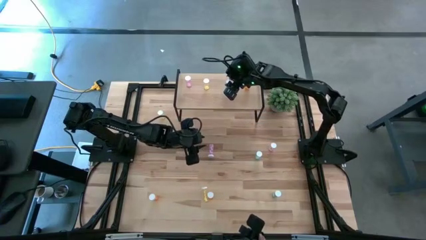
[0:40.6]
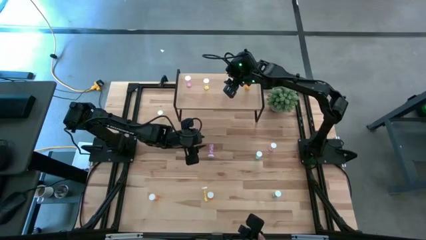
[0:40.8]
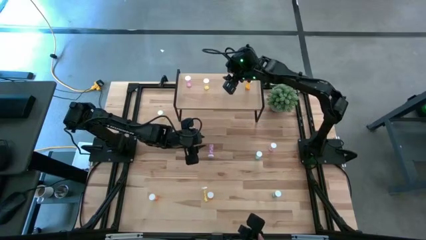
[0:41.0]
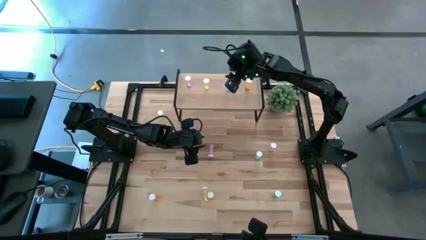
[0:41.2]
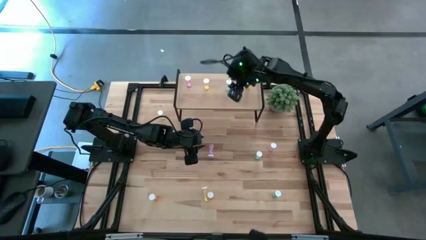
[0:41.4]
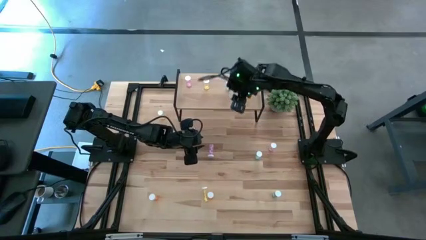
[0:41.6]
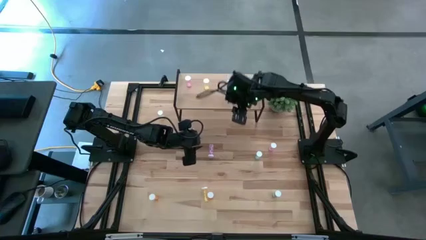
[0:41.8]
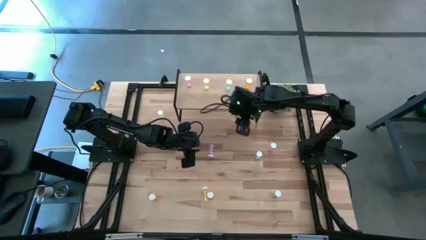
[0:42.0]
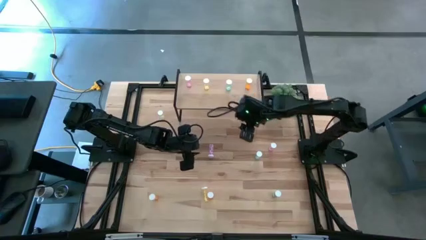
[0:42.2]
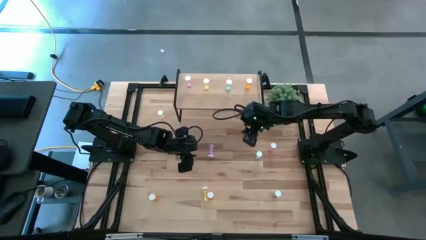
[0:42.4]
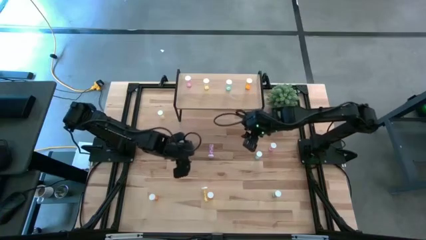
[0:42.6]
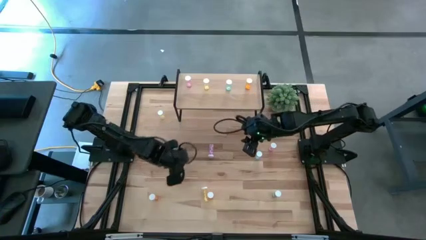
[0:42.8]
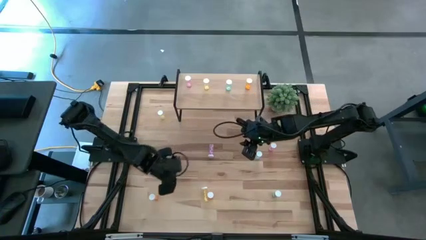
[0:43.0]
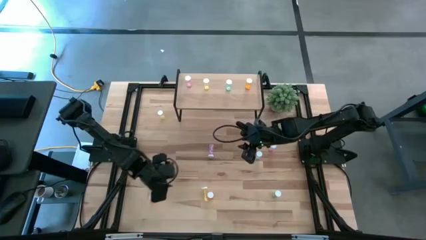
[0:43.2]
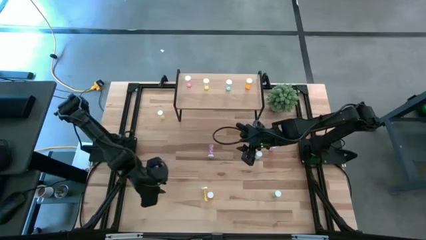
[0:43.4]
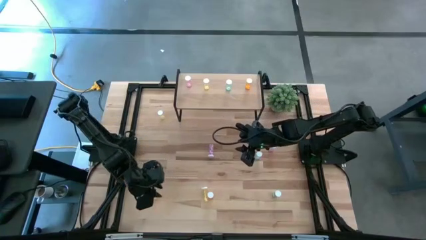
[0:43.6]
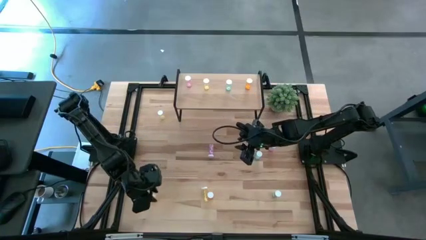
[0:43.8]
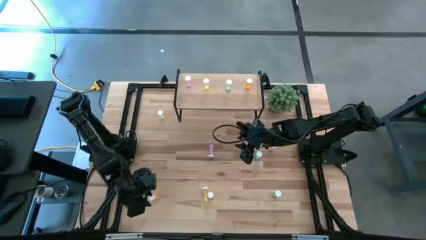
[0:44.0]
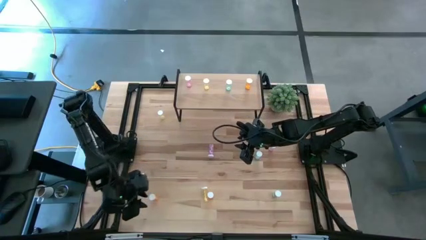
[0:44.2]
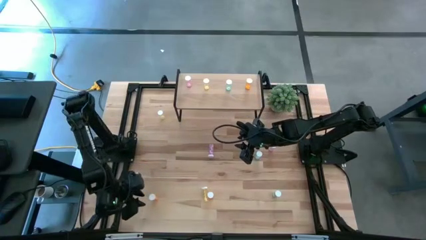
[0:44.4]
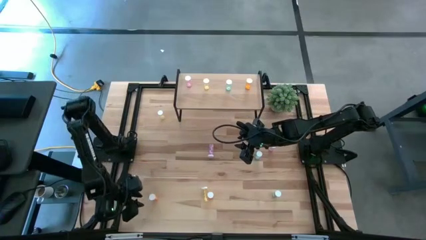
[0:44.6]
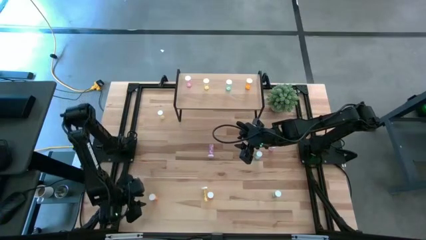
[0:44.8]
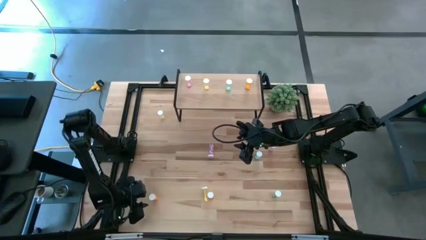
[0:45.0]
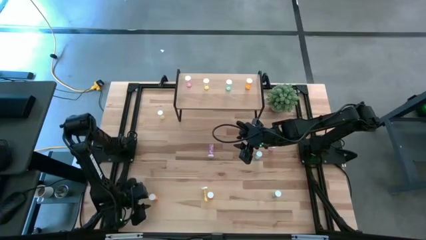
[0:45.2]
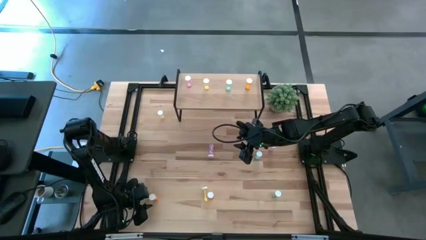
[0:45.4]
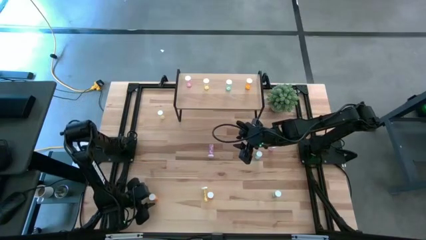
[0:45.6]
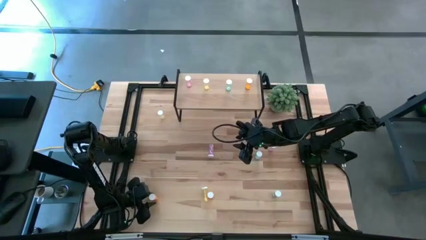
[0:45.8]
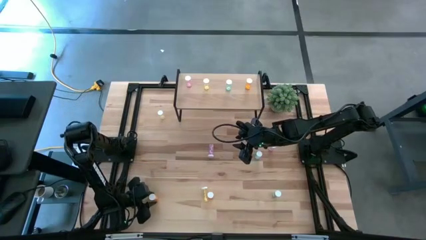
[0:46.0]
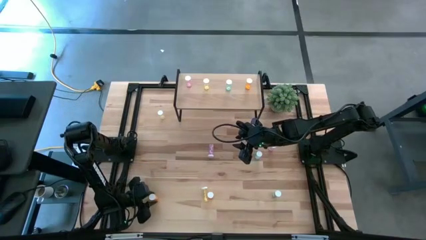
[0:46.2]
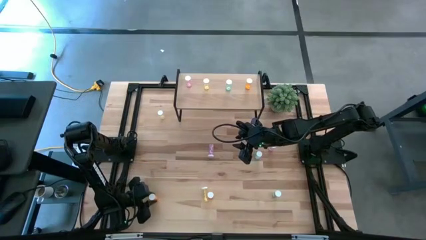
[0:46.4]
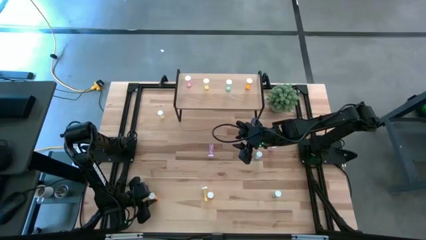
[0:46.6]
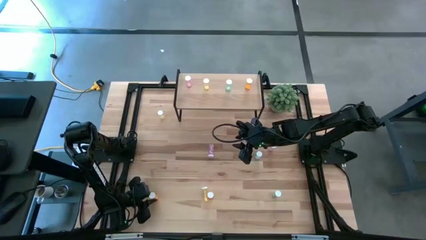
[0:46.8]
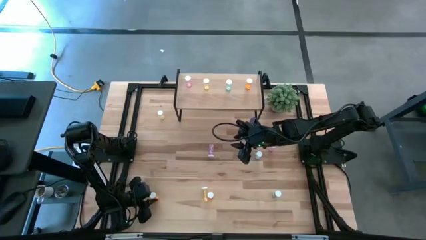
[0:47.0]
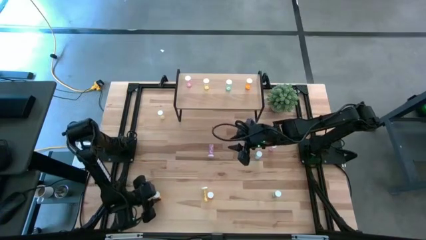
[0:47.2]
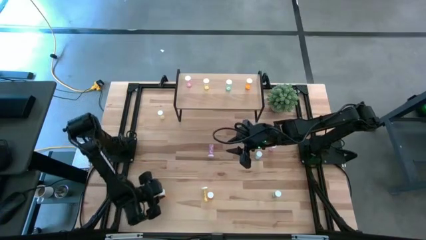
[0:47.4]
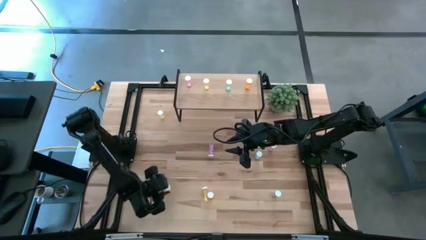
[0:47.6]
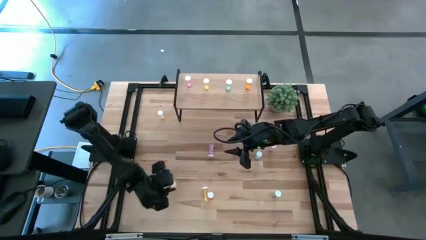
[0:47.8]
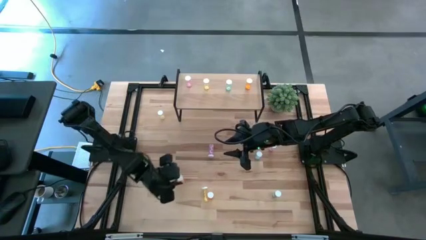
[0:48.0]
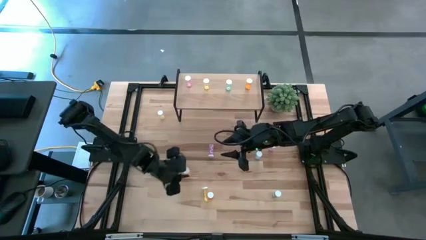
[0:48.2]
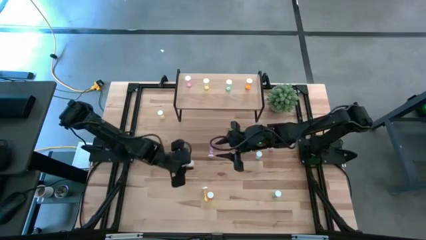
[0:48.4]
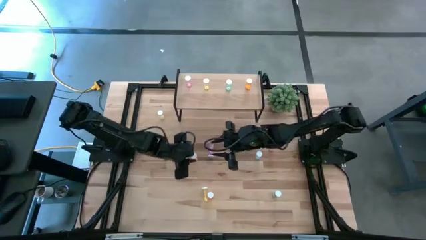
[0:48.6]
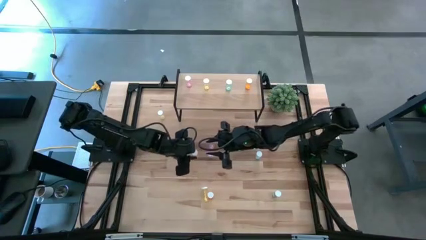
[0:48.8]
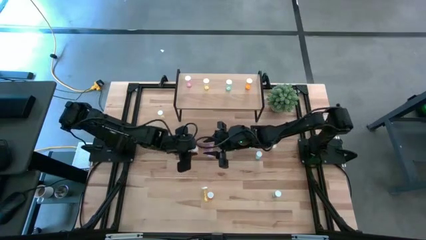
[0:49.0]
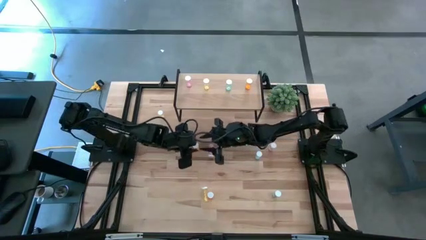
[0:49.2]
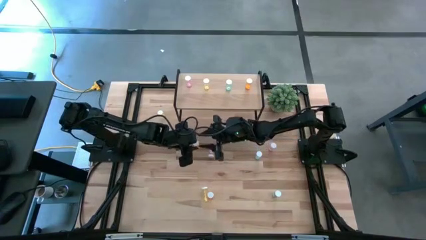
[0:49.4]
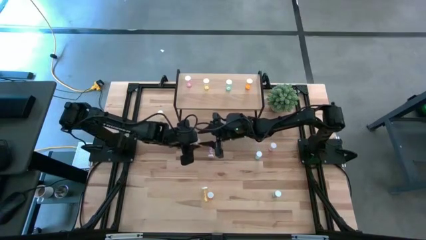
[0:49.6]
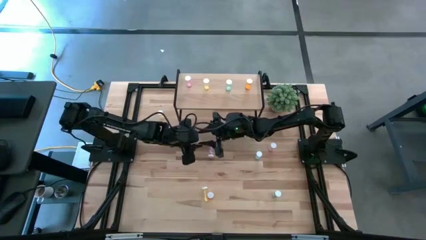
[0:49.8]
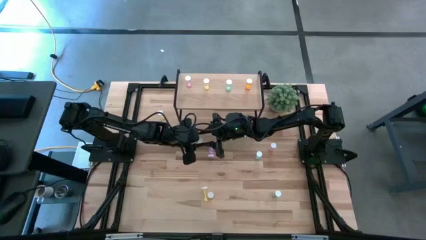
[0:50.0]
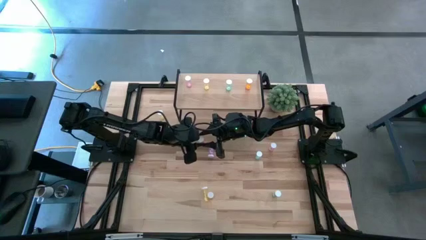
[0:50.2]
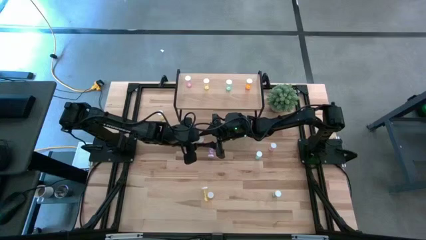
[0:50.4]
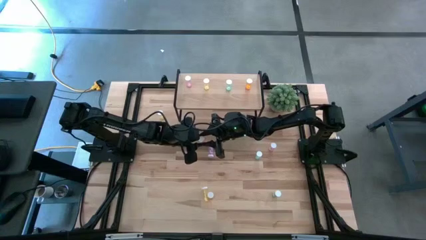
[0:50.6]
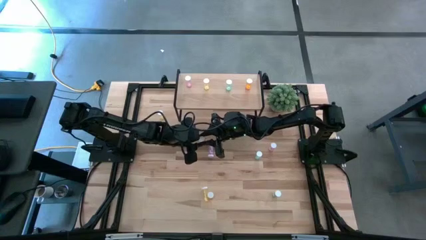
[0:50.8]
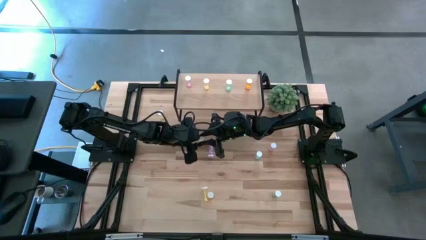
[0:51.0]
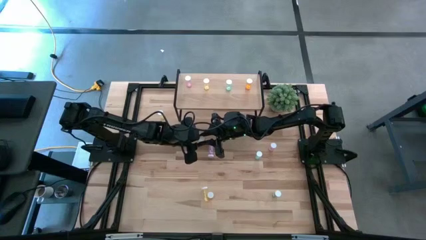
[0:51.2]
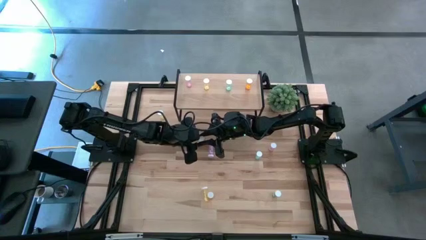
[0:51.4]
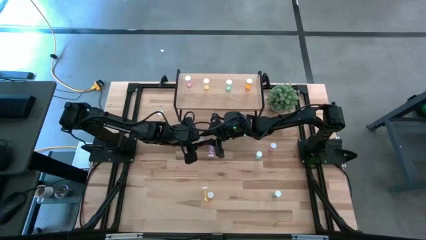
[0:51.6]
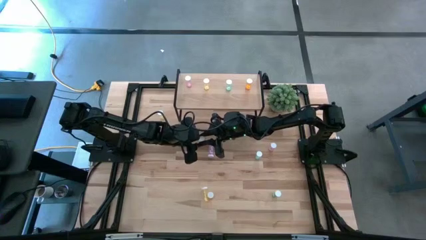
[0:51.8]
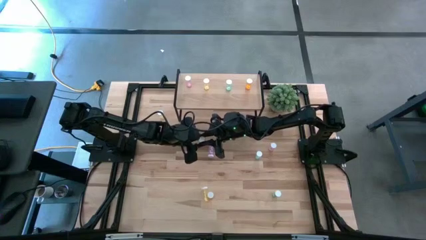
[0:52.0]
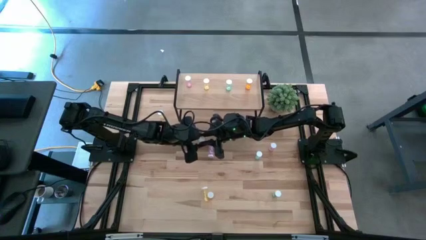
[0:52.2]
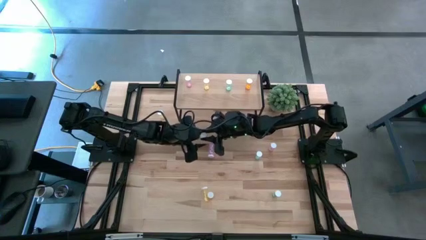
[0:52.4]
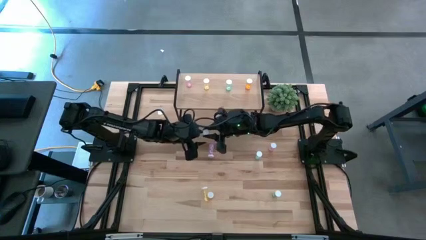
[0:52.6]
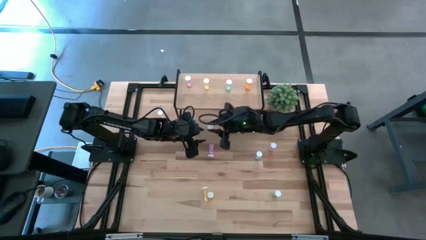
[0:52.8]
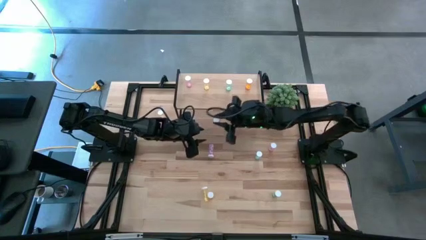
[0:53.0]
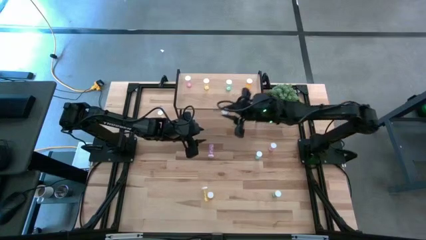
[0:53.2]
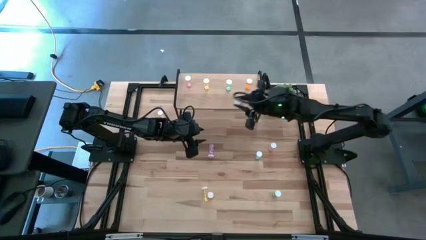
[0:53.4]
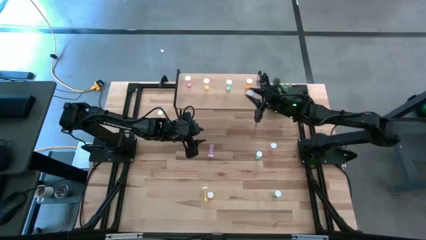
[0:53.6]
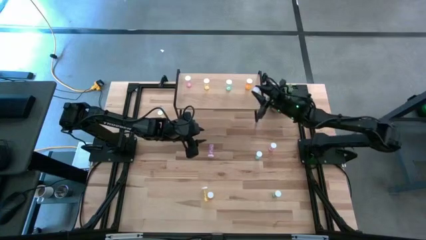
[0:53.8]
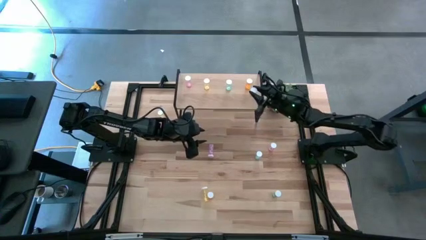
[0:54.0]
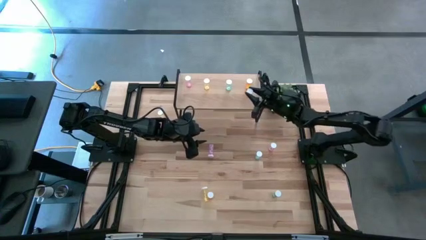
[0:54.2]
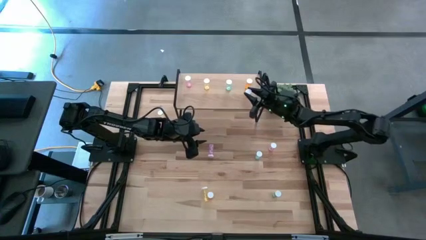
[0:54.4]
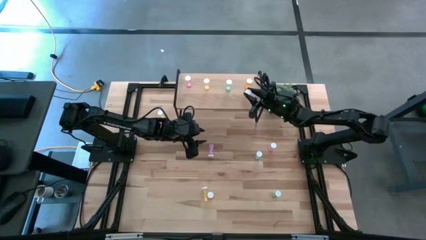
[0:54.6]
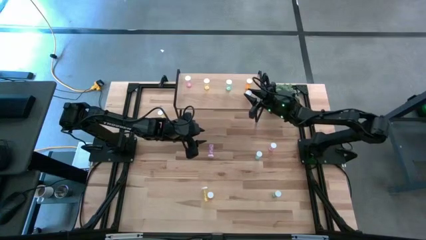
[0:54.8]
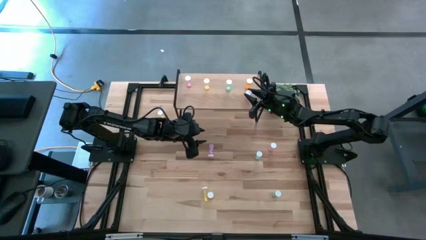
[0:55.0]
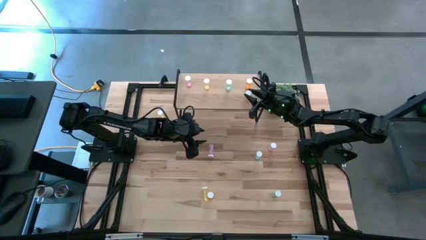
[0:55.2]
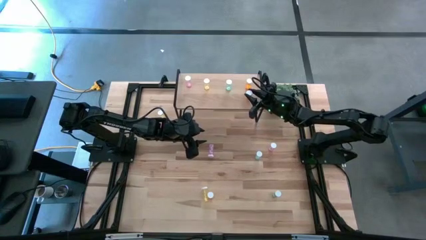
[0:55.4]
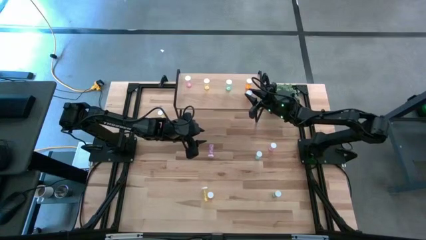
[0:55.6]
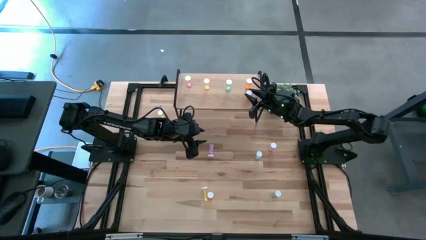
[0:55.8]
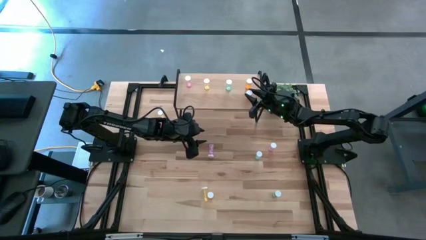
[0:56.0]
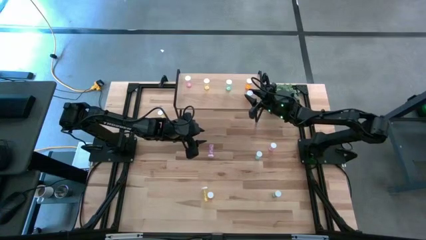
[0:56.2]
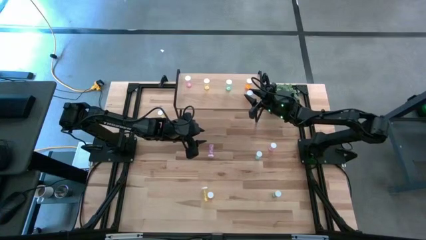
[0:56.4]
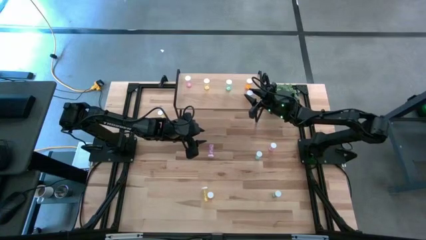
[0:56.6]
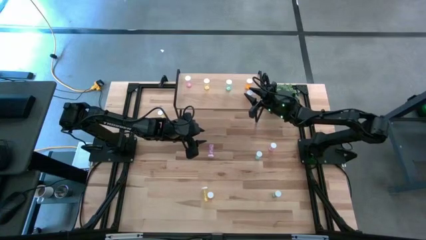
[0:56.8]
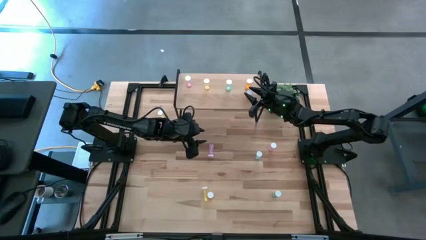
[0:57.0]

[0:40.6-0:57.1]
Task: Pick and place medicine bottles onto shelf by color
Put the left orange pill bottle aligned with the other orange pill bottle on the shelf
